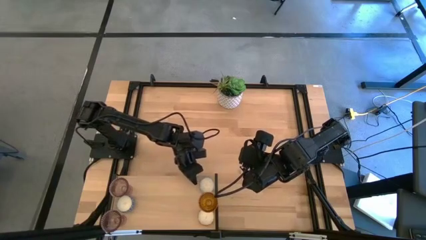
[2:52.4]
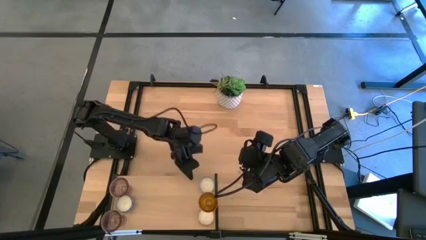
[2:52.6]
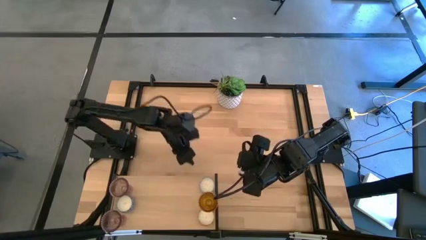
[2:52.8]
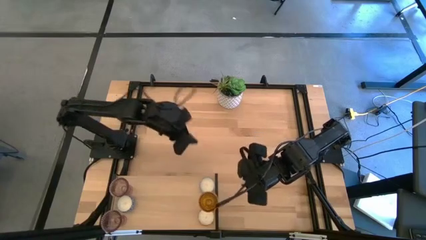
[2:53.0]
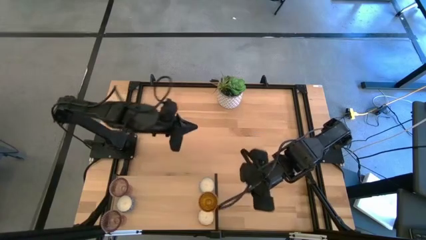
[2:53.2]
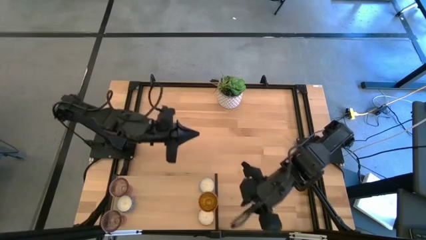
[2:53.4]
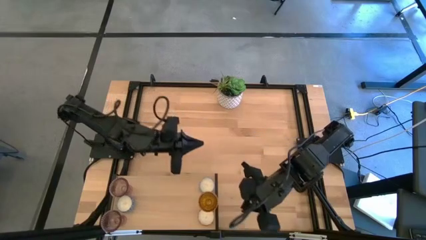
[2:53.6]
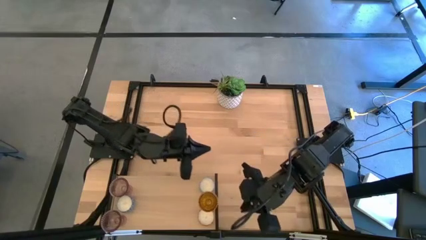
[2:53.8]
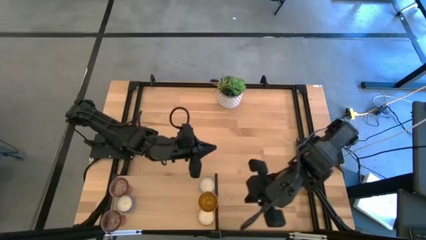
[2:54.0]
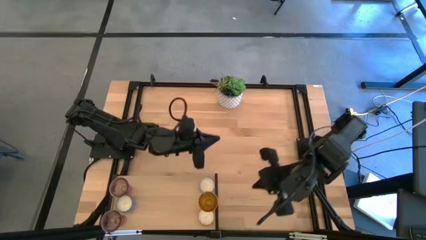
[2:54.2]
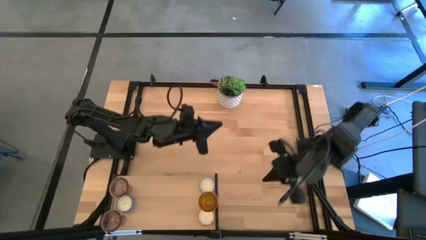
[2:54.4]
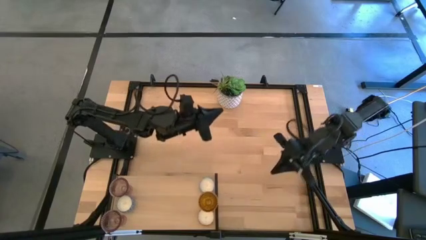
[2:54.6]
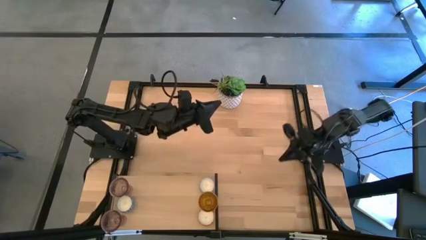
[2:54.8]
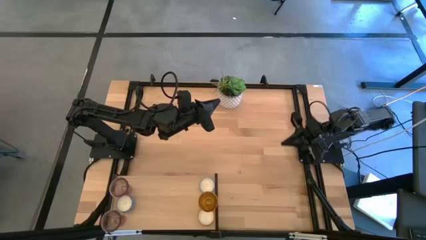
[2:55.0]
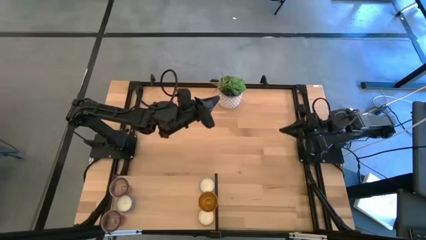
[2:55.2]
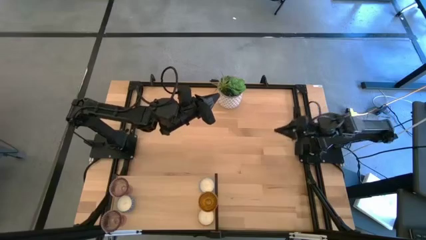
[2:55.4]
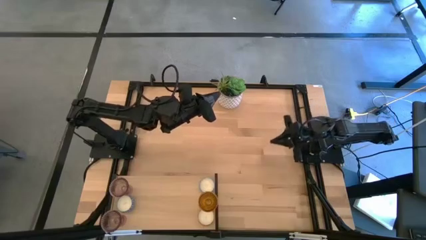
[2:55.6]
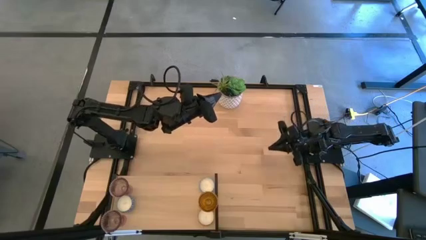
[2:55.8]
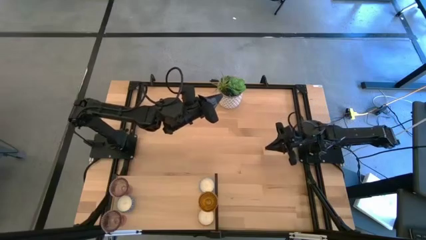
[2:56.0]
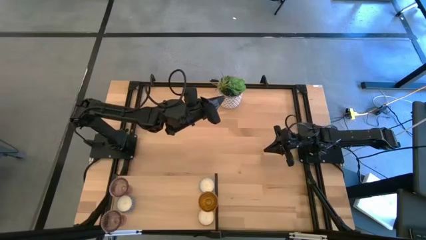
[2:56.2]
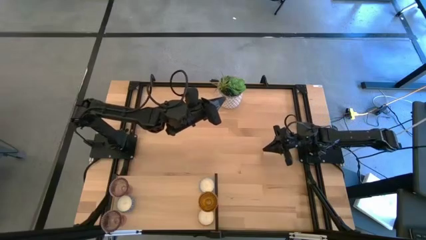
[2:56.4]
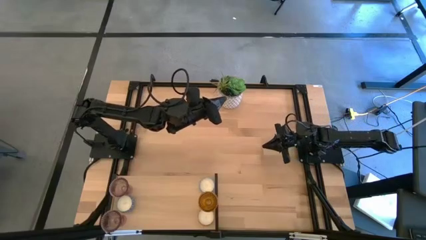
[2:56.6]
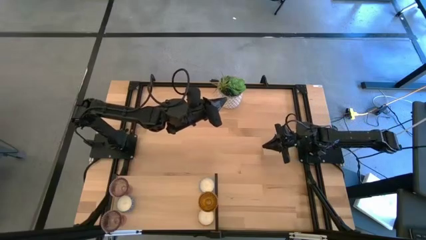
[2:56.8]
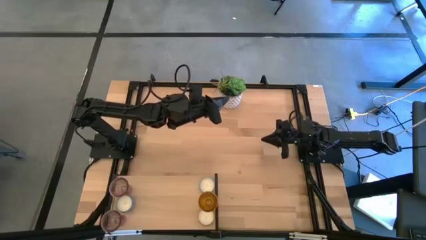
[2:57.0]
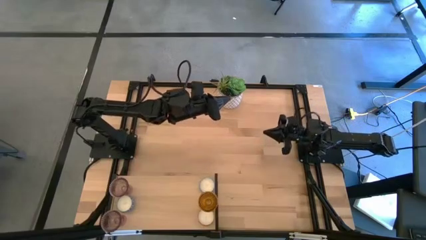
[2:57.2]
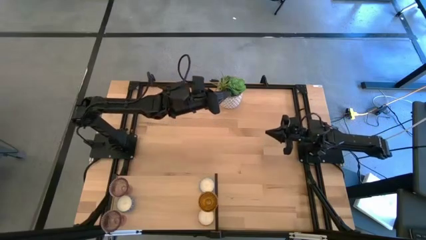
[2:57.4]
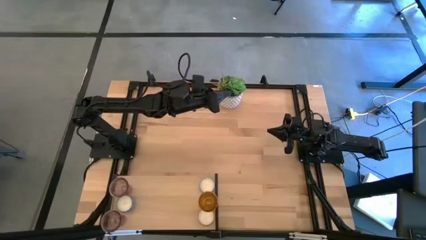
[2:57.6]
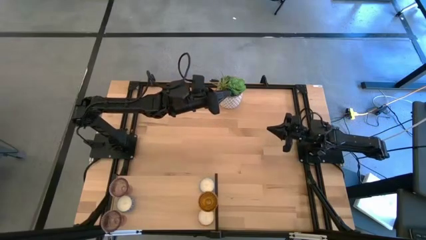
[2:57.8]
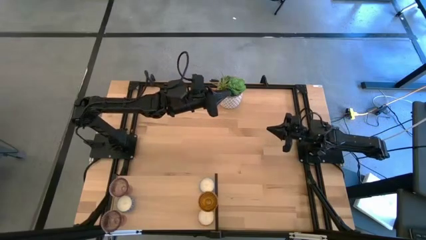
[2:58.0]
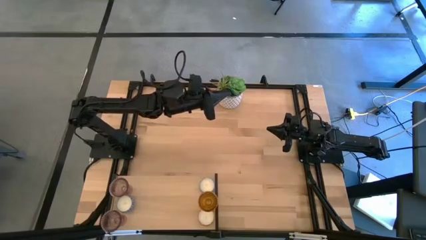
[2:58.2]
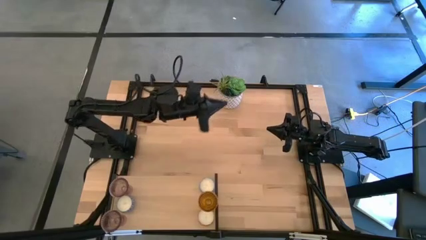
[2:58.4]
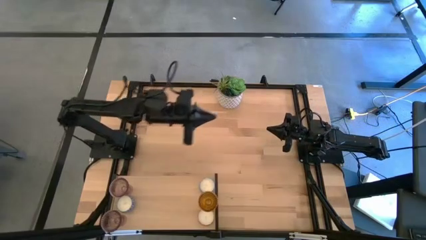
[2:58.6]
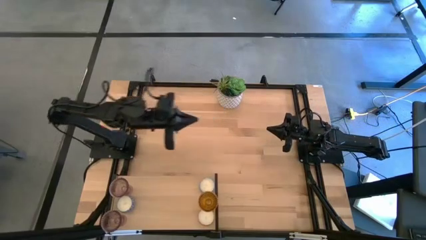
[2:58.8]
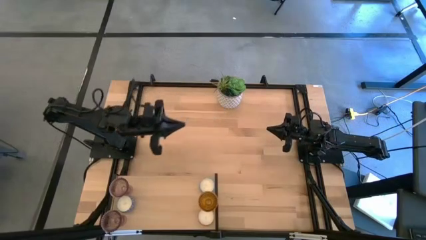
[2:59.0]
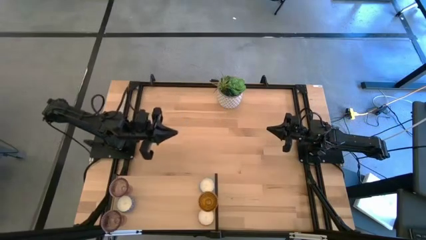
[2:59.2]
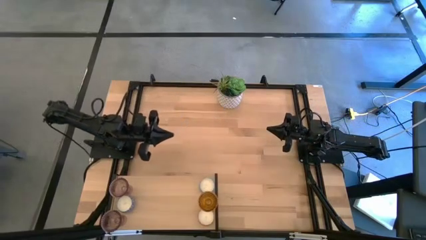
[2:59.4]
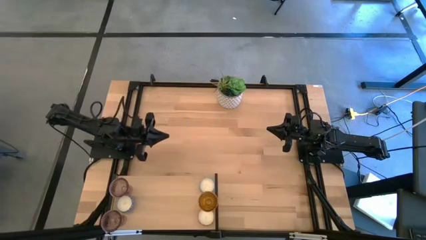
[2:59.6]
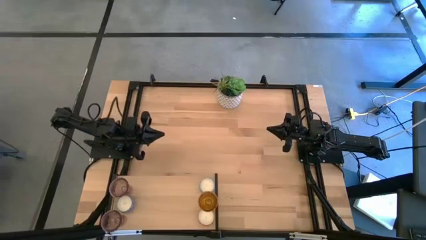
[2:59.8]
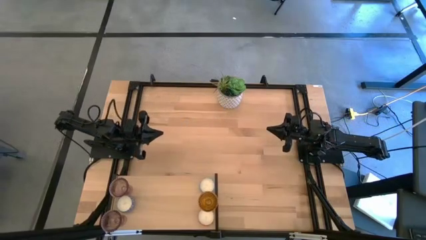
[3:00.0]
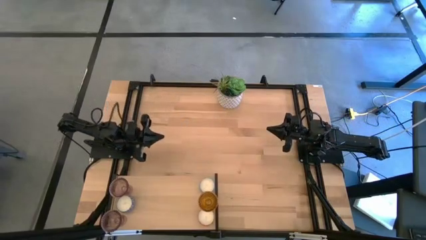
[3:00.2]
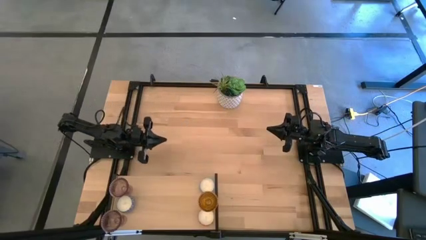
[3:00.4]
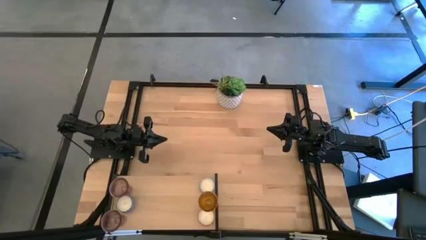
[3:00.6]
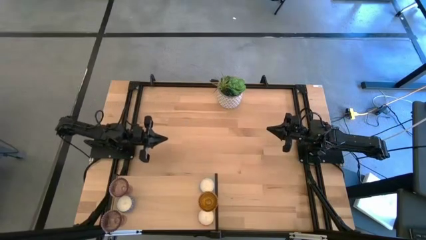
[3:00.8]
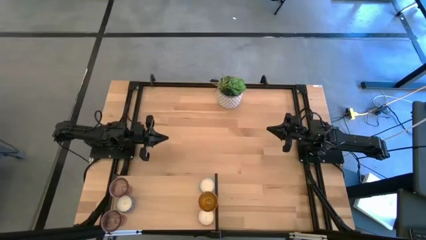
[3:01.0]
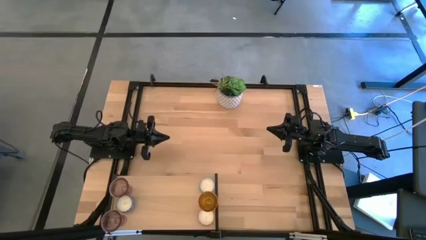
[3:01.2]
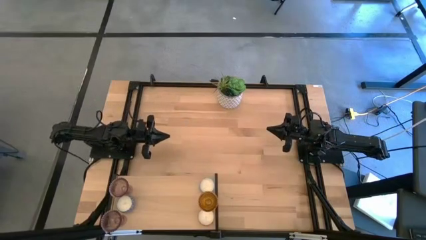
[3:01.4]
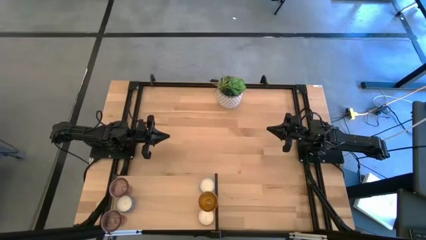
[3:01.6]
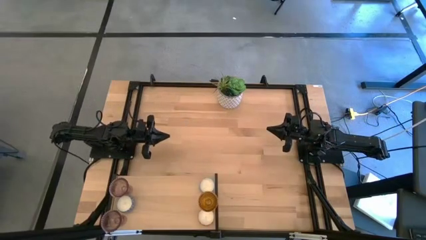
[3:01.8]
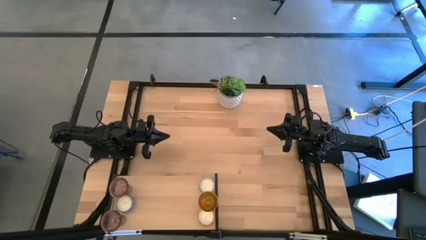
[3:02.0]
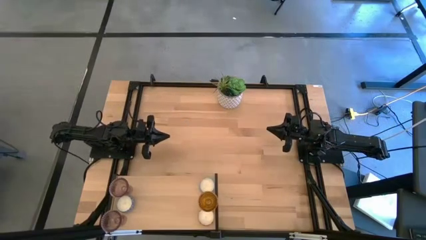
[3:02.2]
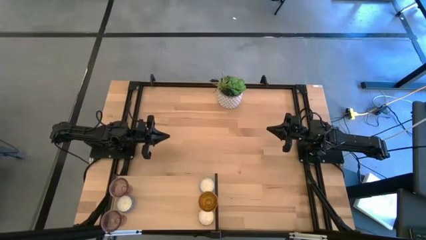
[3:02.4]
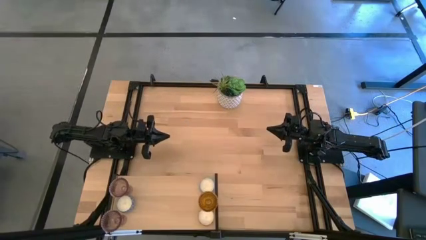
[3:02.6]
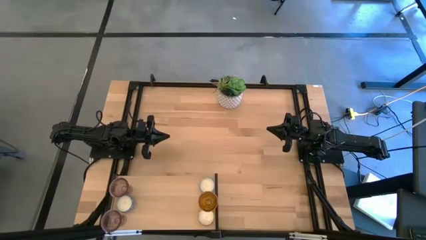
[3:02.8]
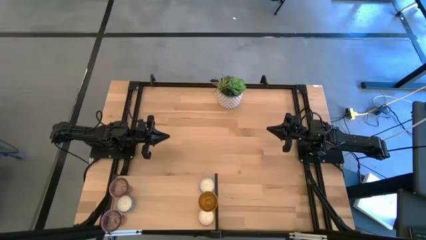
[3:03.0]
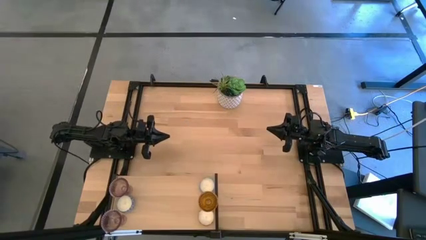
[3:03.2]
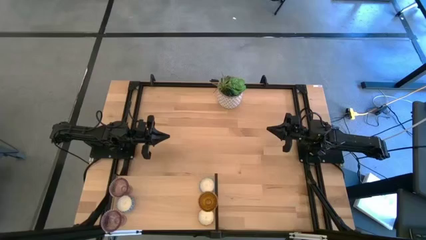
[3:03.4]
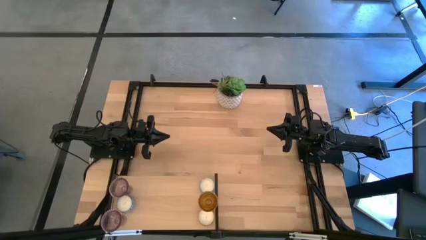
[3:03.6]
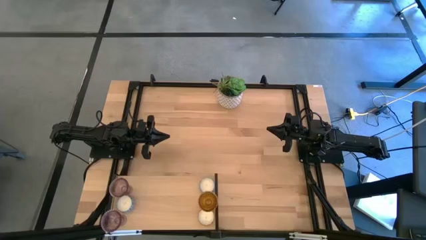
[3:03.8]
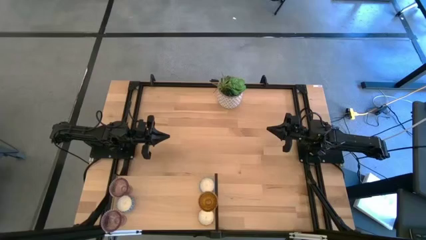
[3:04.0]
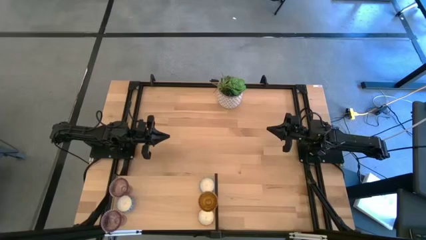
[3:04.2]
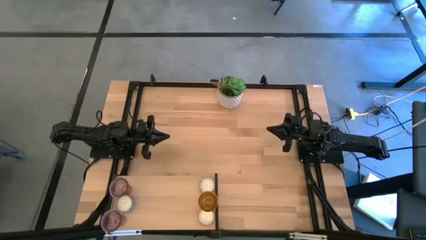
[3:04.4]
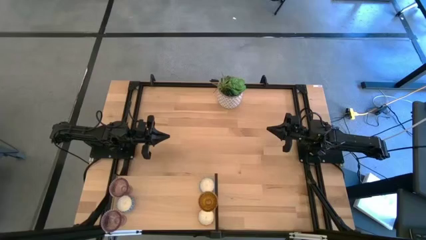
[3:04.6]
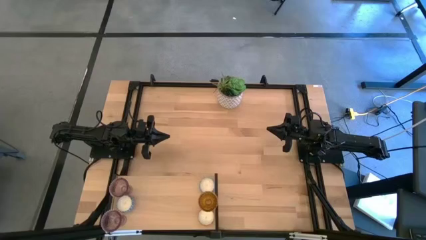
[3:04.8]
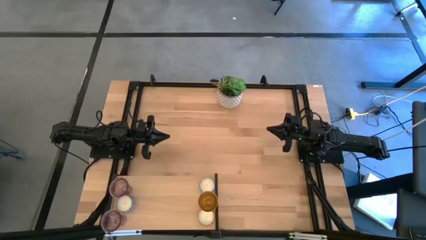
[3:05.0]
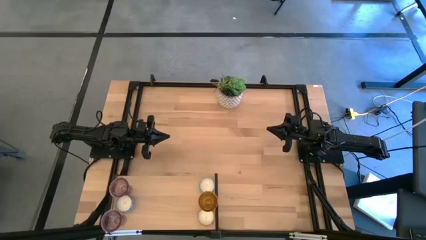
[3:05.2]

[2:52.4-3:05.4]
Task: Pick & Place candle stick holders
Return to Home Position

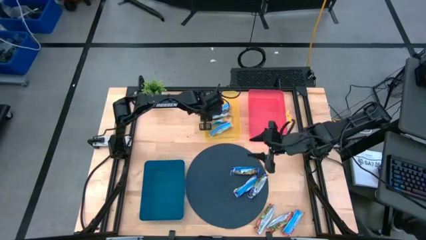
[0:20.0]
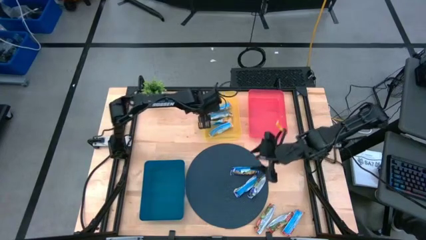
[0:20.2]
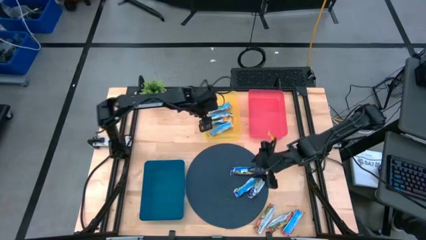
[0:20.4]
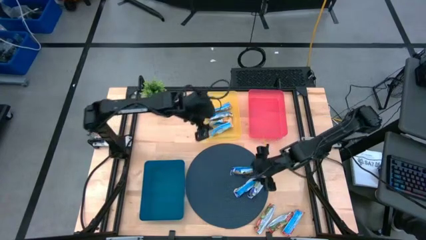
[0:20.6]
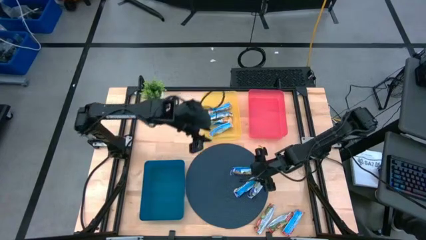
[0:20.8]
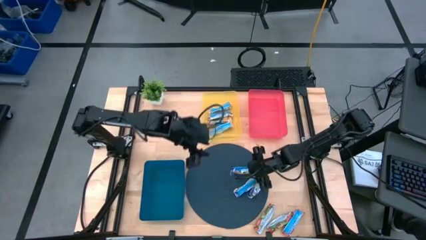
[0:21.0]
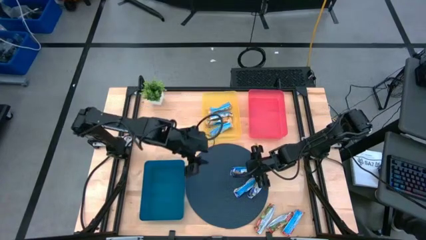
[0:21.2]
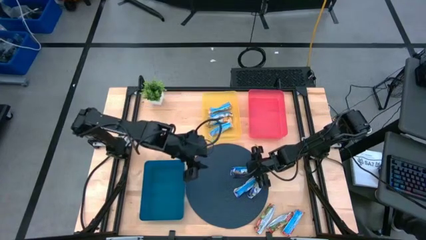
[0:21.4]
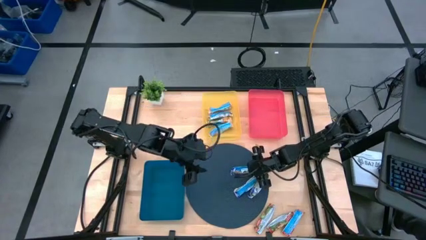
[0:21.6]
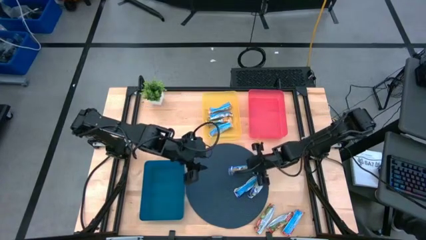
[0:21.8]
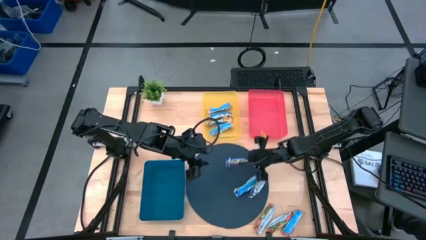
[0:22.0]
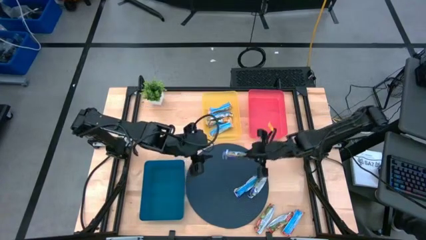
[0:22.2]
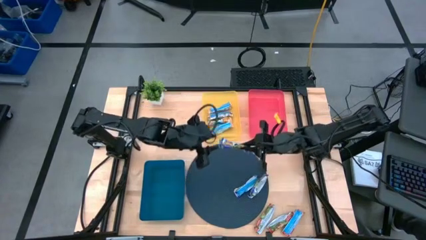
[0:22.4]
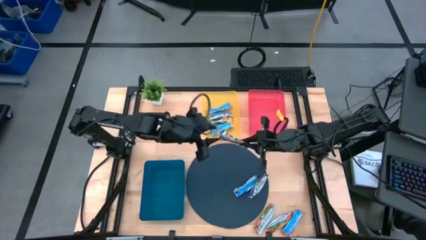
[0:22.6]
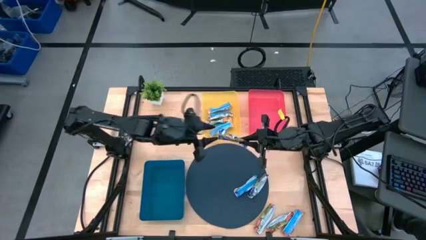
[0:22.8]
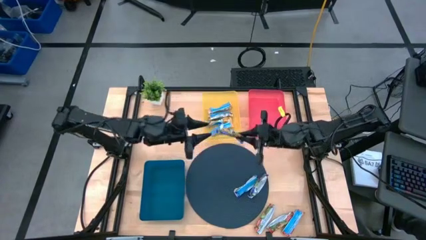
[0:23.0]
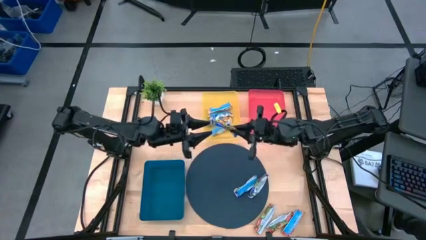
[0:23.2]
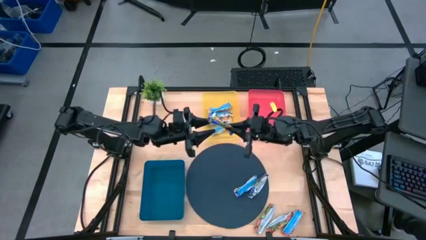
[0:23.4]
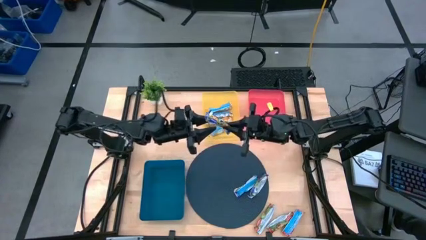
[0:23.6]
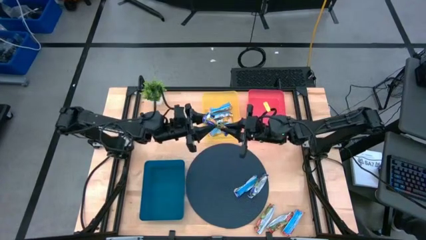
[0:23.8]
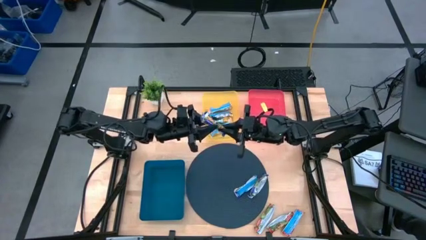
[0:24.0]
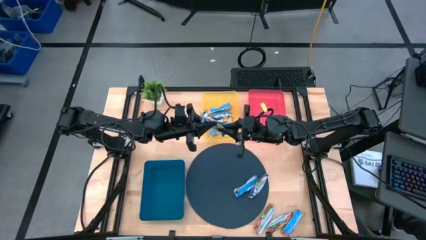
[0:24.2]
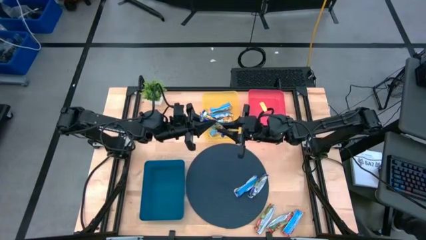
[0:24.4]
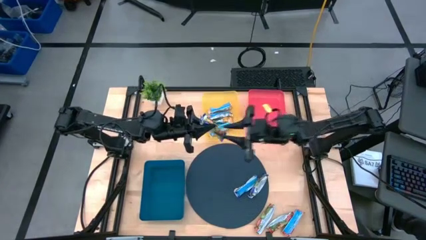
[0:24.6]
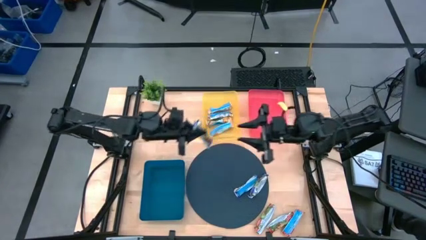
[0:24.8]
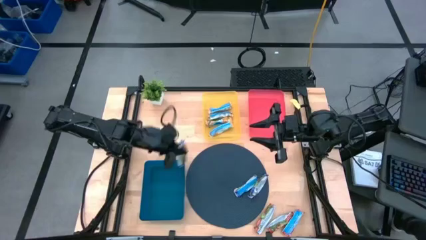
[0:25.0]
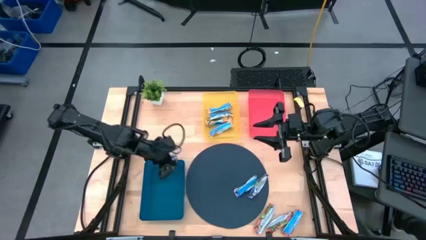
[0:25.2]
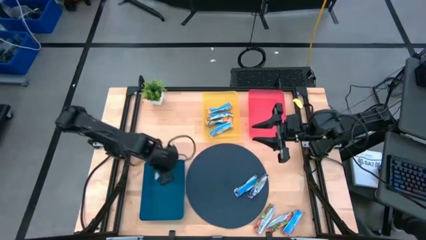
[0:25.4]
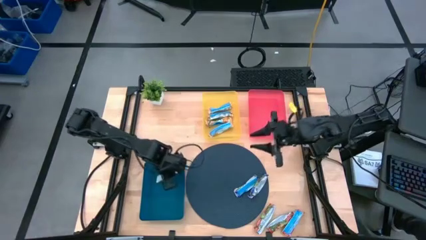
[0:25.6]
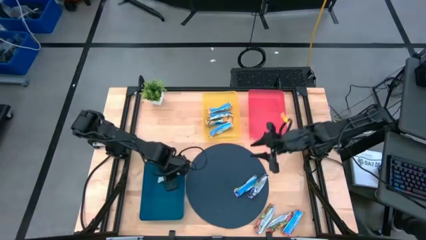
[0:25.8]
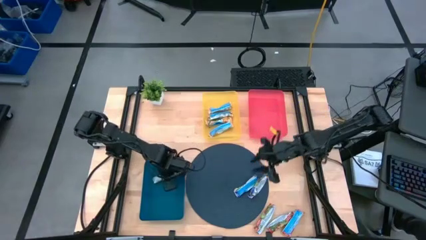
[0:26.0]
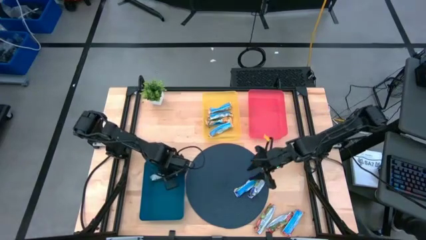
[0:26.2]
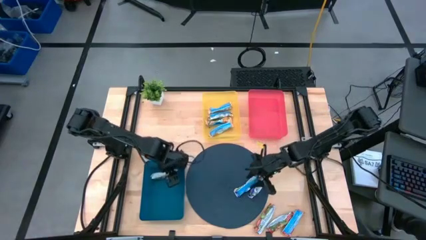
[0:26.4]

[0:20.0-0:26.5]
Task: Pick and place Granola Bars by type
Put the blue granola bar into the blue bin
